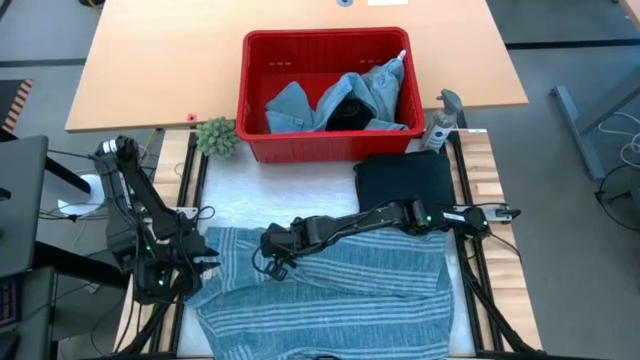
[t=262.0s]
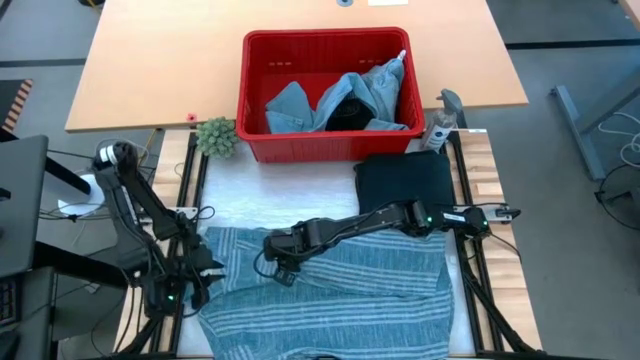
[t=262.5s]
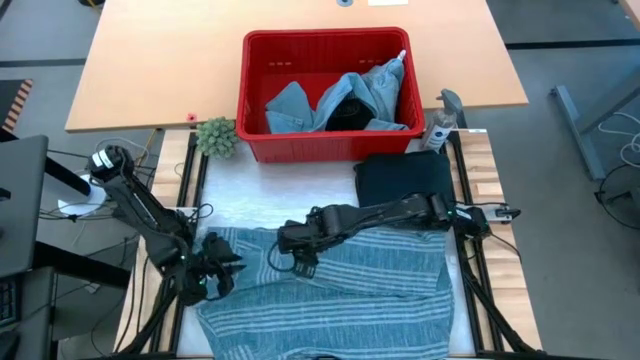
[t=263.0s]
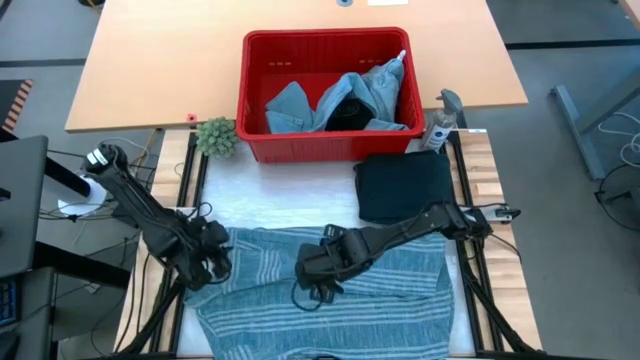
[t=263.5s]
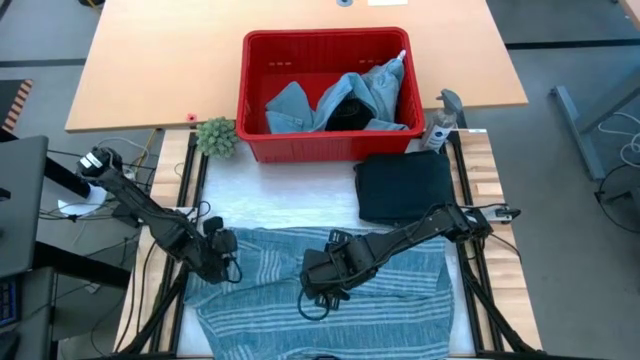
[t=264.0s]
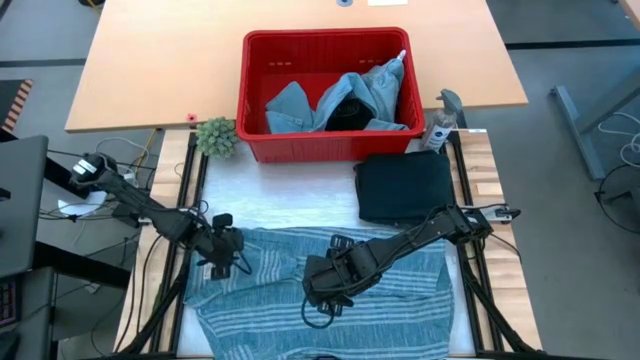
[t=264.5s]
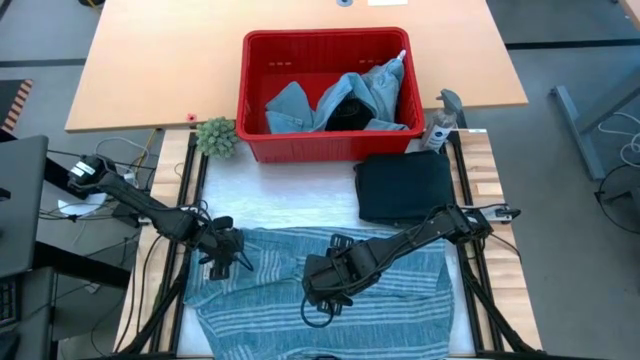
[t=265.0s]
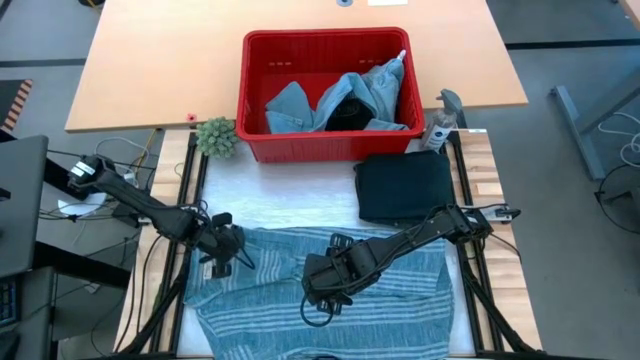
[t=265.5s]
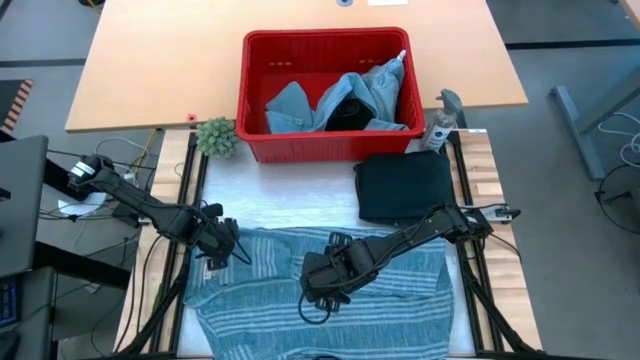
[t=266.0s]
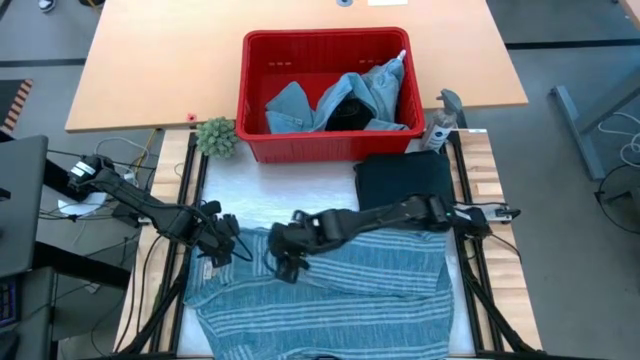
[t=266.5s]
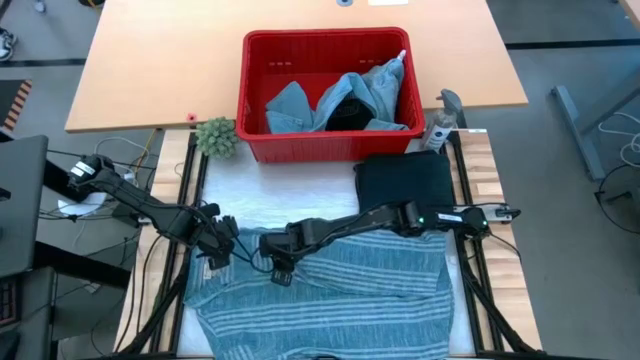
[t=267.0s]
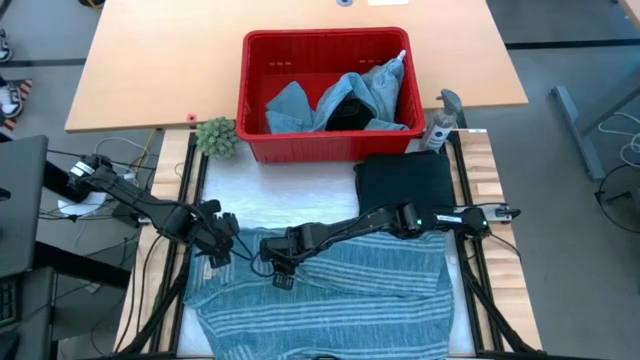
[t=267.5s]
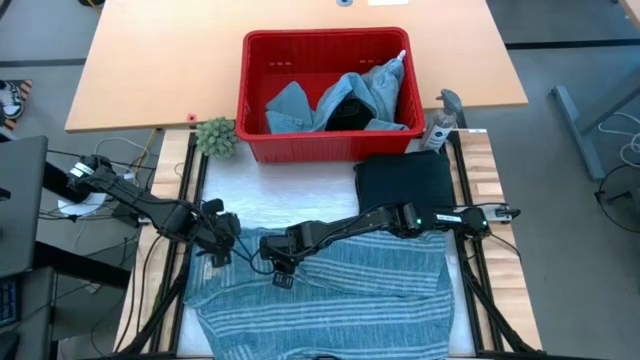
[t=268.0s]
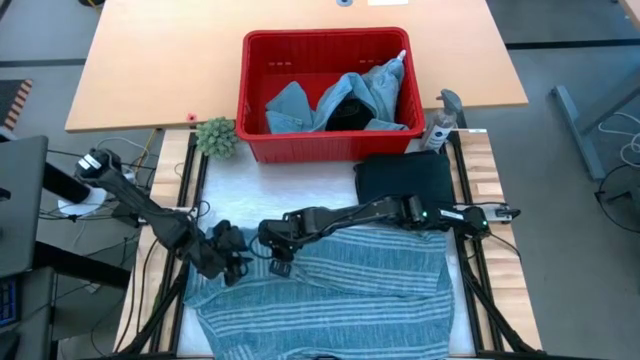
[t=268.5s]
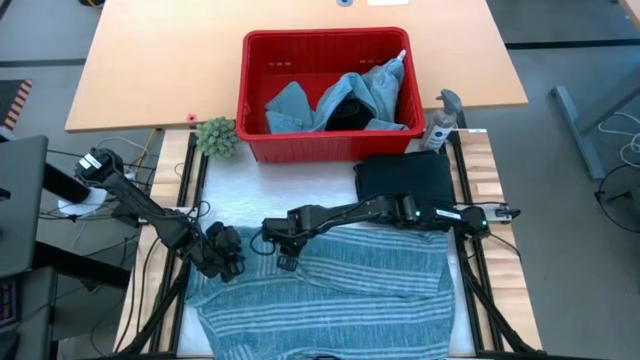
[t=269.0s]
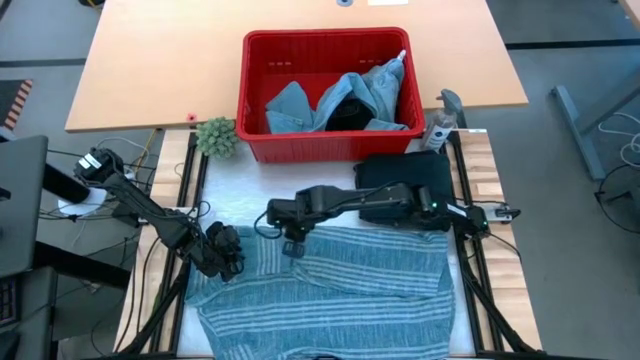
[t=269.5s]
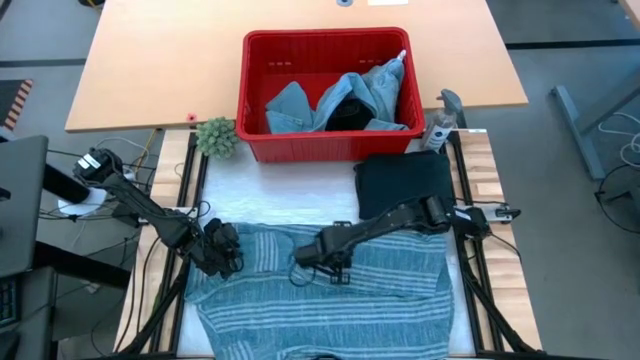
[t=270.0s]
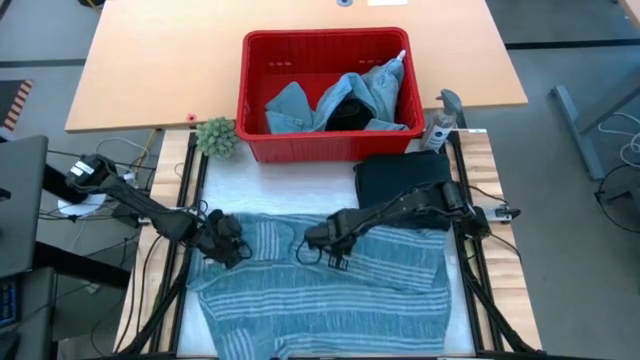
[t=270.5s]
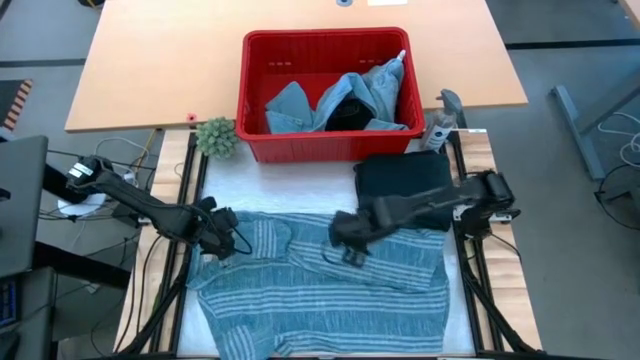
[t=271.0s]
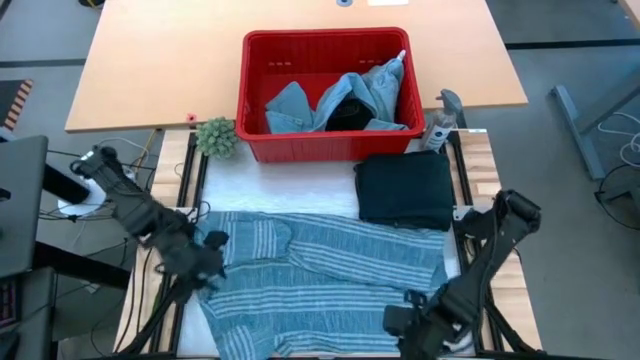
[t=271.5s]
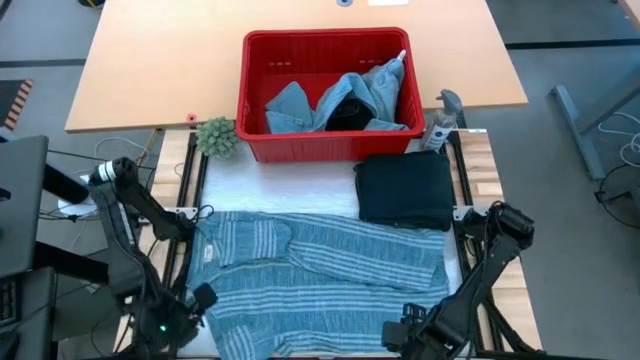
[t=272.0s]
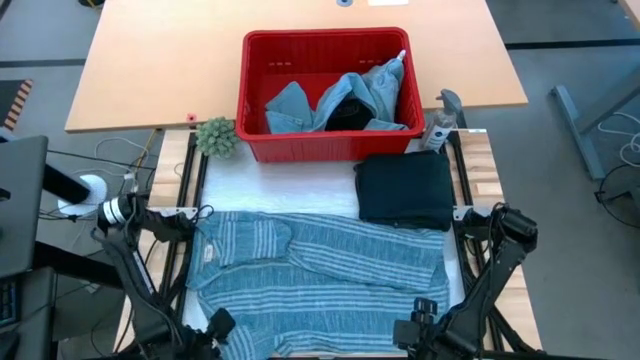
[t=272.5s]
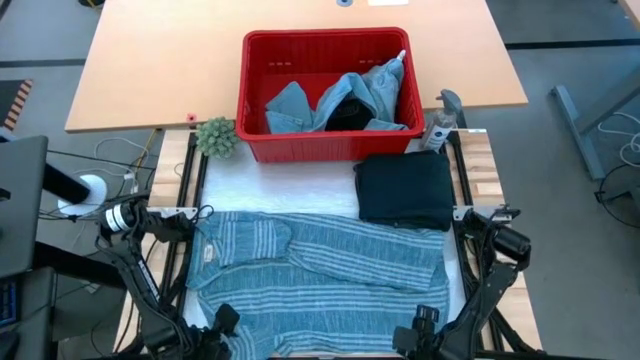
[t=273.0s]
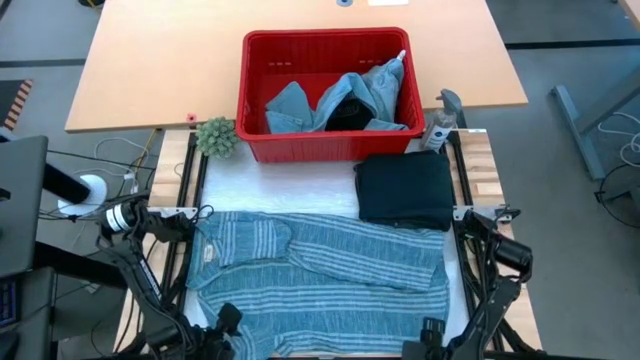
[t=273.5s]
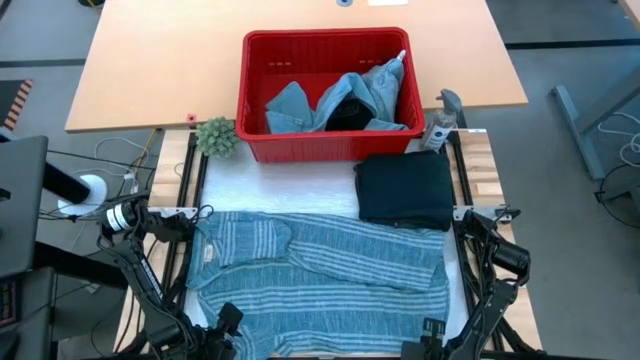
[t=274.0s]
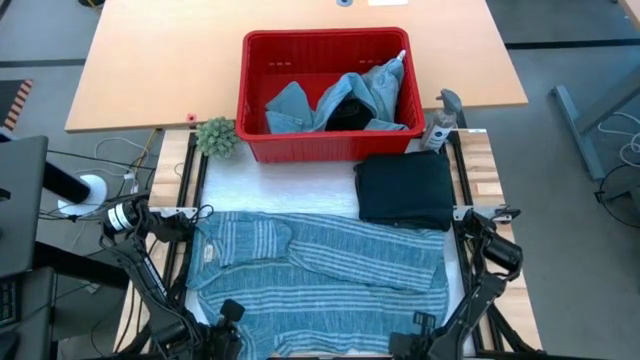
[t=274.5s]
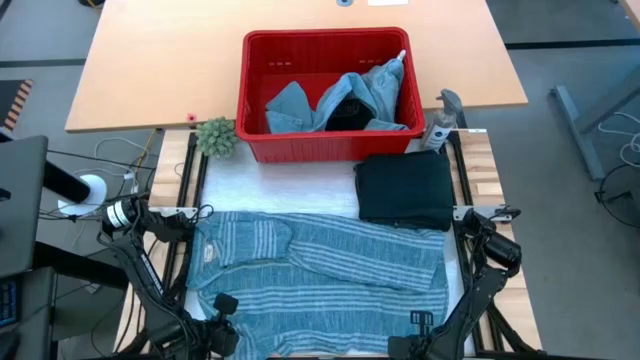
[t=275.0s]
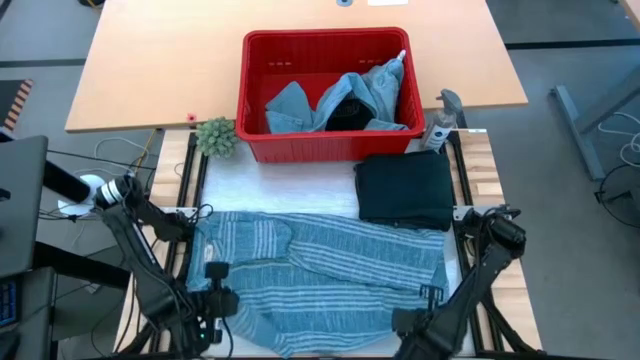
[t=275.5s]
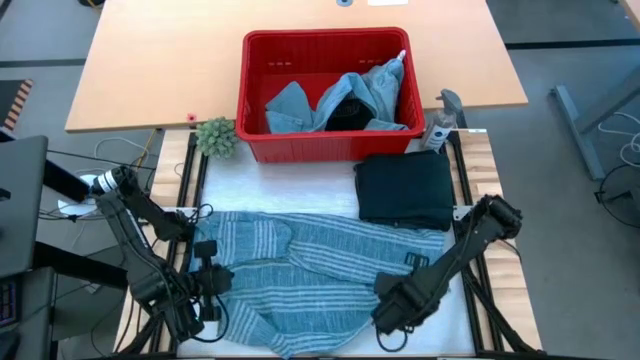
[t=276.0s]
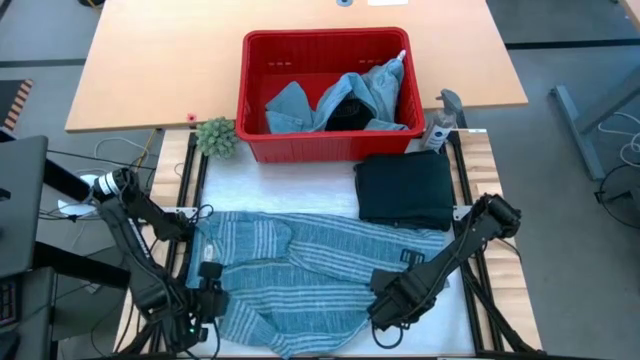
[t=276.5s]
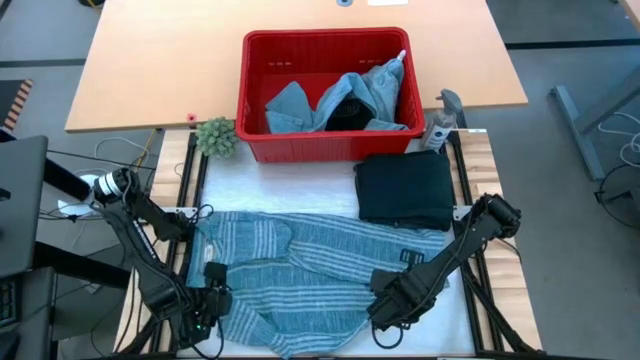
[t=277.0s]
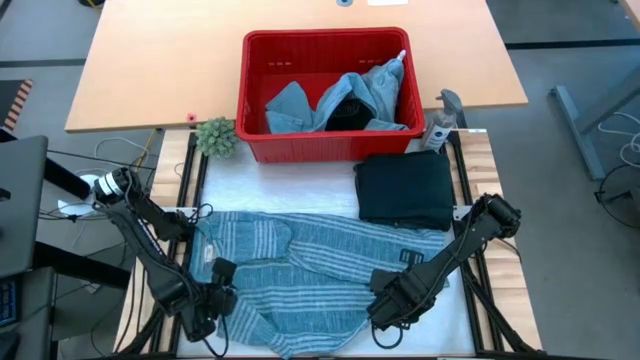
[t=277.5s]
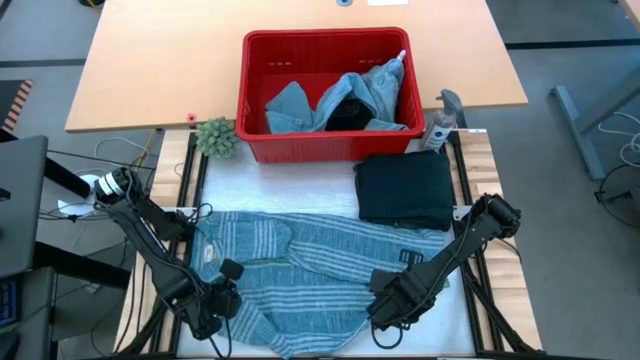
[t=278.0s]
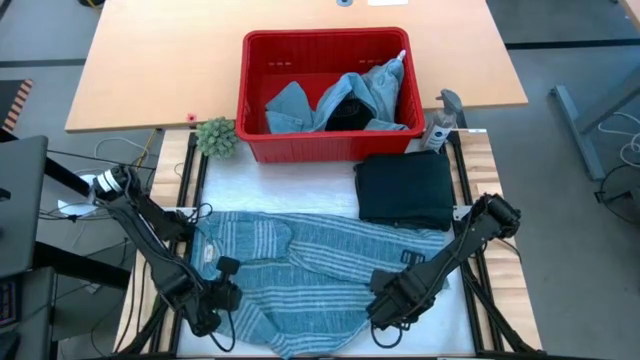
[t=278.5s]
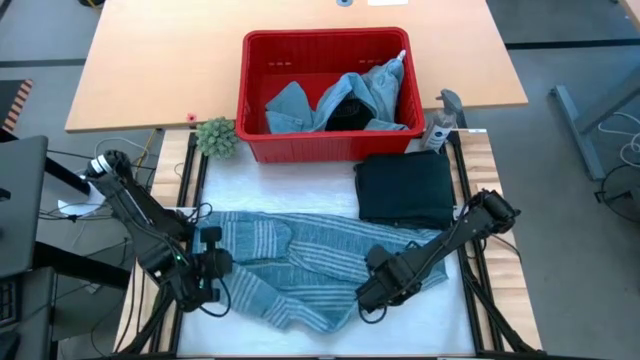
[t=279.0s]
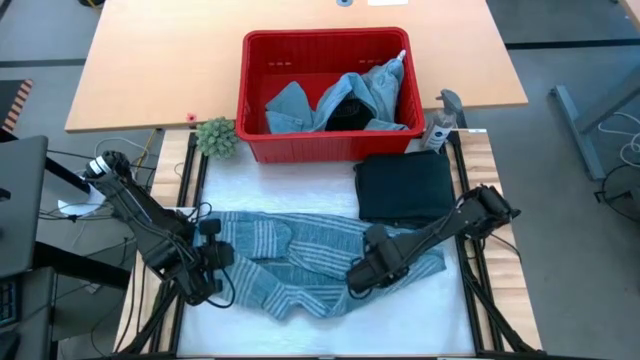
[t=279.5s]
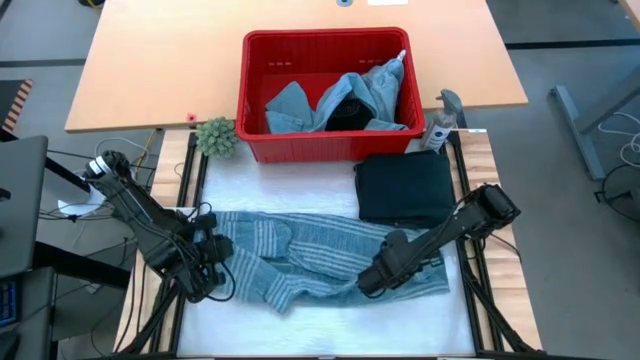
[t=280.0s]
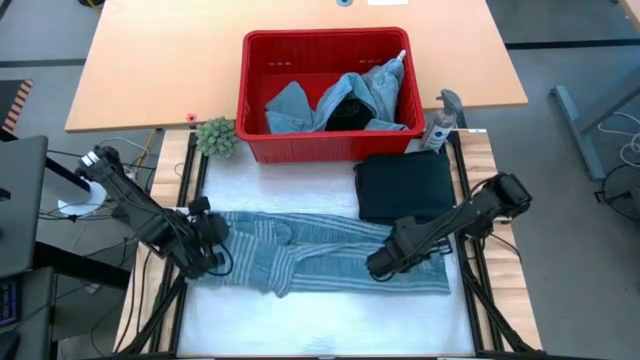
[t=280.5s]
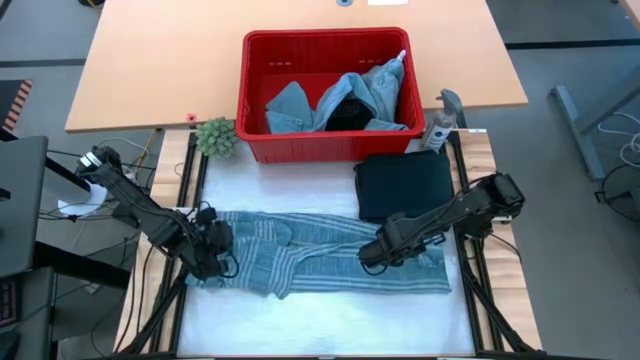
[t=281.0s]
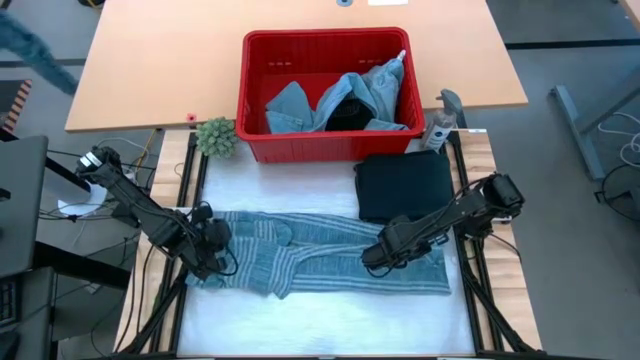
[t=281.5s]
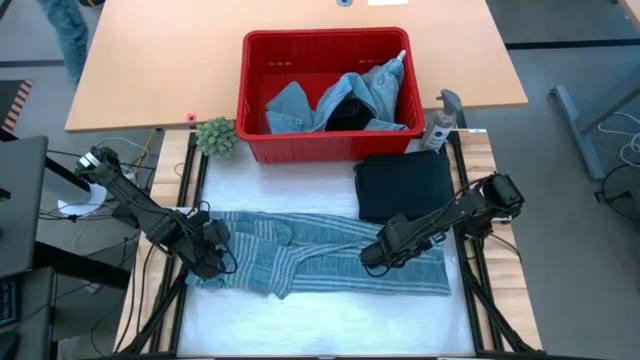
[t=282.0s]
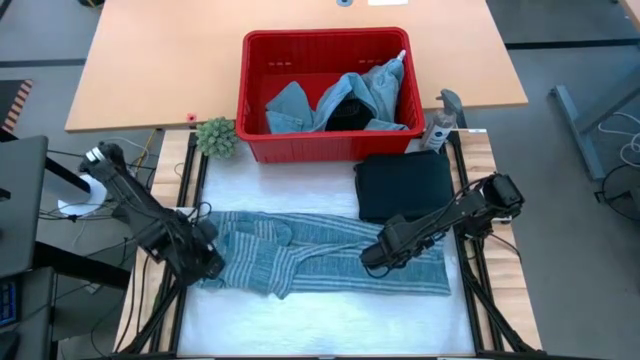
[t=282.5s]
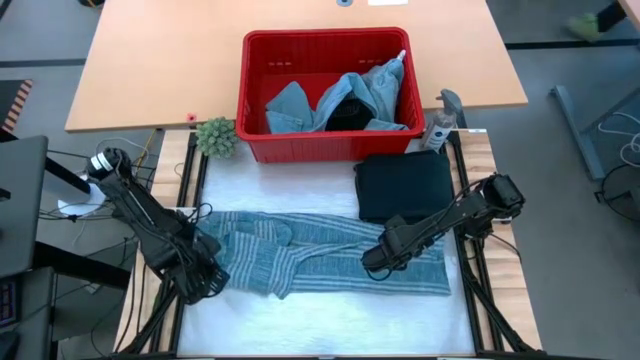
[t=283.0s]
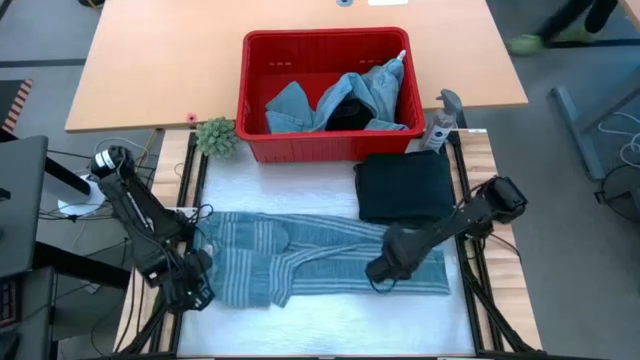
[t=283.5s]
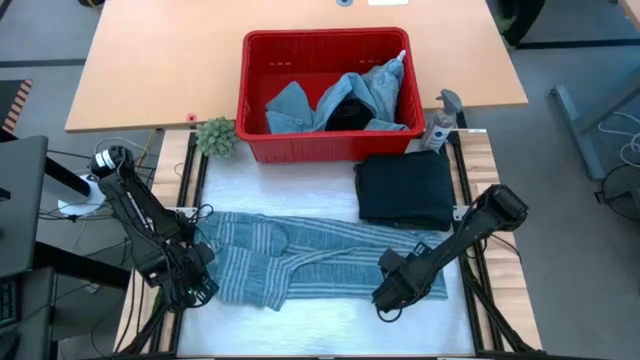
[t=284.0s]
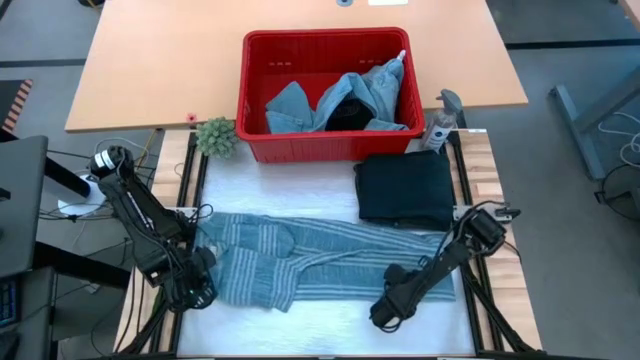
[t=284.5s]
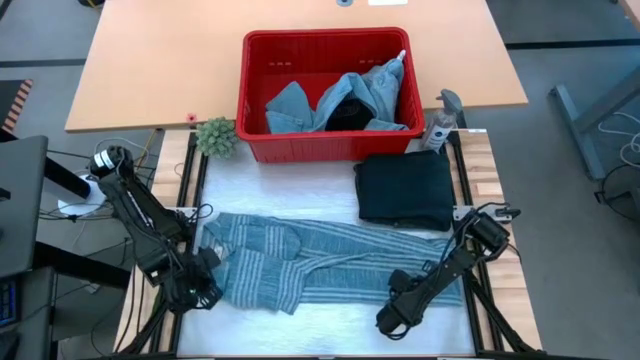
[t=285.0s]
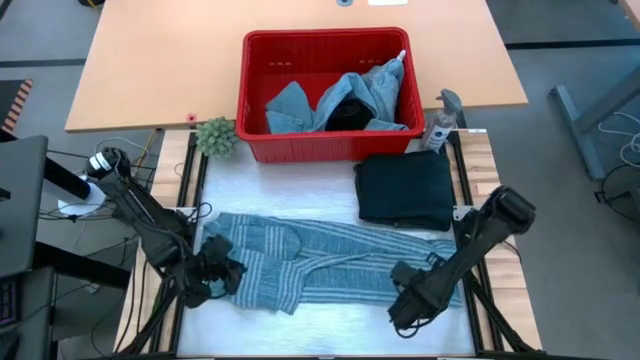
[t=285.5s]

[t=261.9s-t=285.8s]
Task: Fold Laundry from Bin
Fold the blue polo shirt
